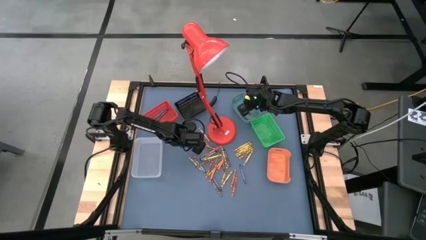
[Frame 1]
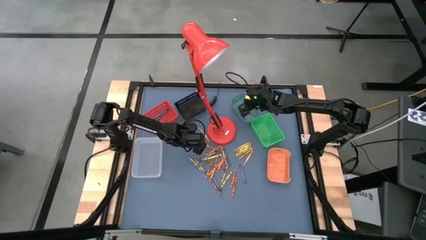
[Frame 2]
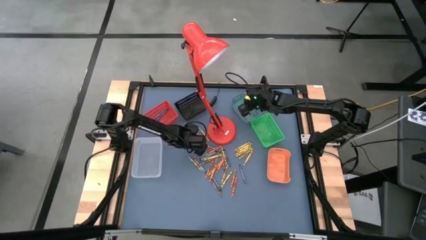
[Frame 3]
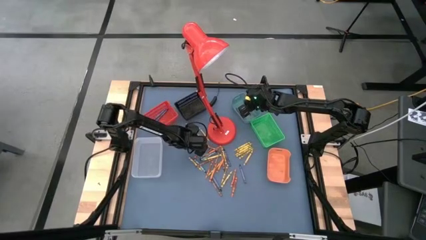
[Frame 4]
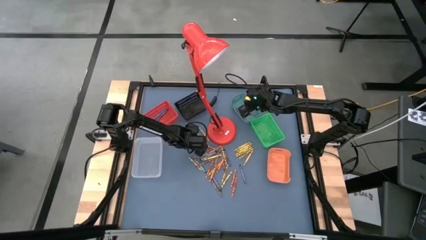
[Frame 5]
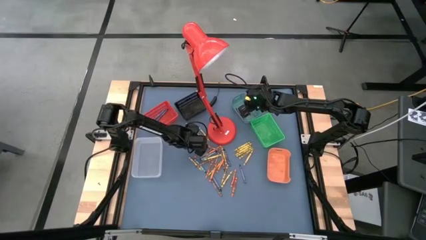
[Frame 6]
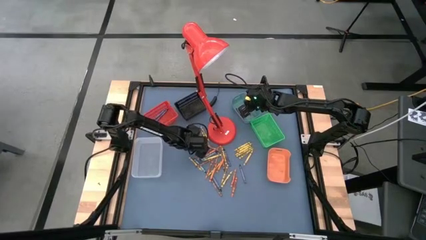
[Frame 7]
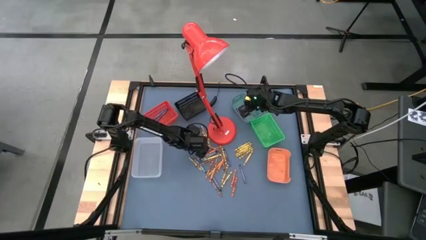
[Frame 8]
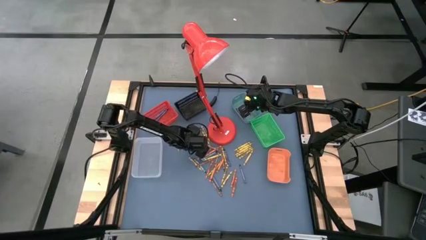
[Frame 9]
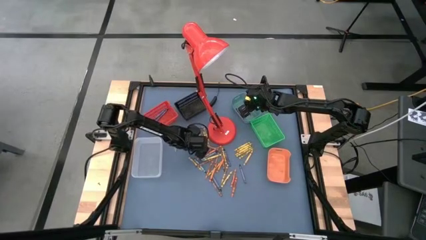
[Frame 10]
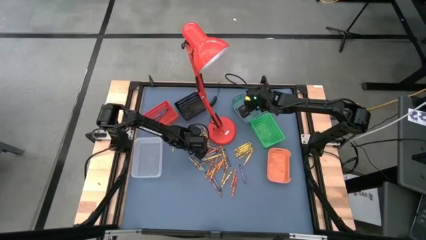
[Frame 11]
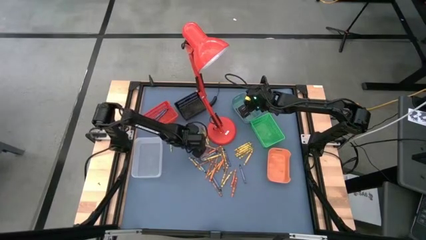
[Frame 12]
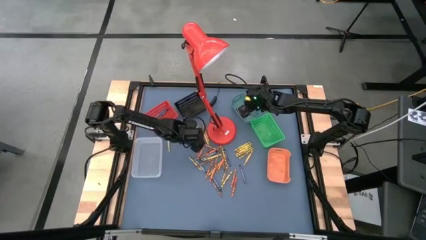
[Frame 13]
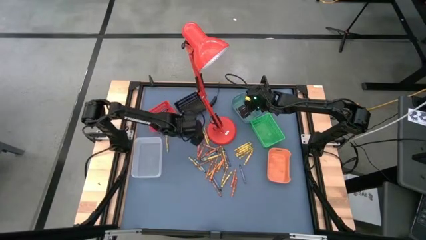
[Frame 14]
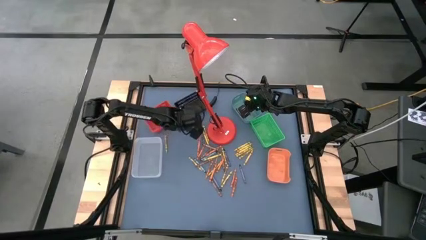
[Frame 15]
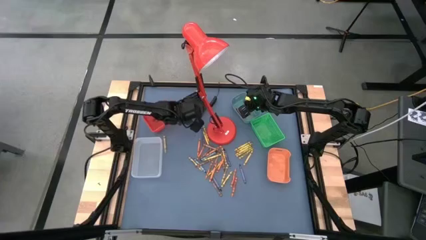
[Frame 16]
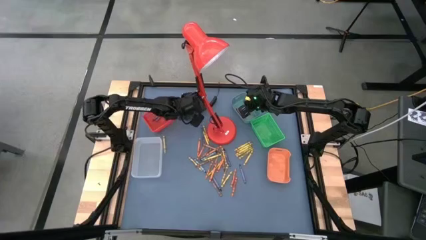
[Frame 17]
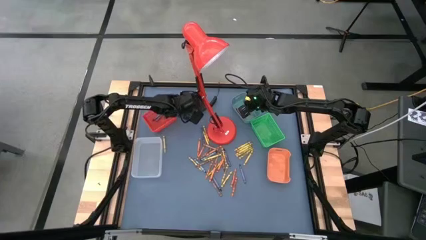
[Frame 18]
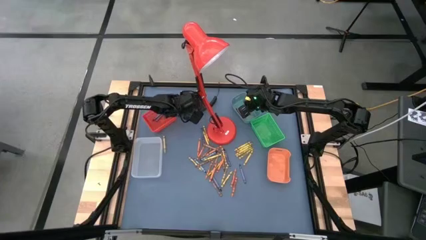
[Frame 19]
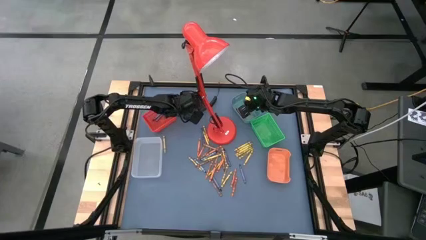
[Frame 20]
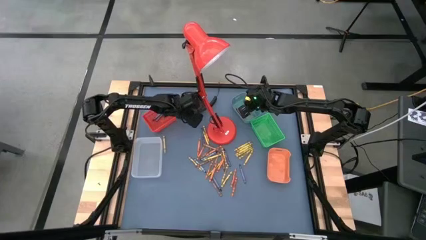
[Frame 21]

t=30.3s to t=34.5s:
Task: Sort crayons
Put the yellow crayon into the top left black bin

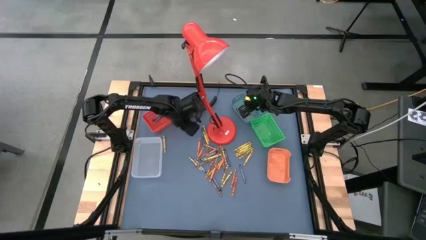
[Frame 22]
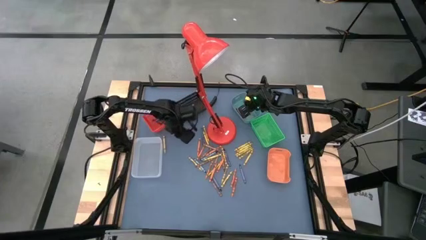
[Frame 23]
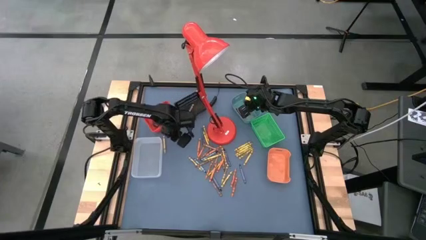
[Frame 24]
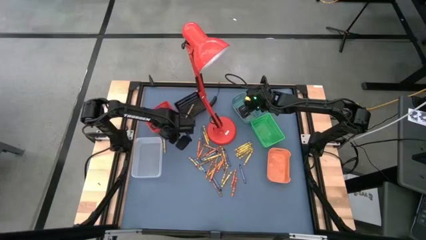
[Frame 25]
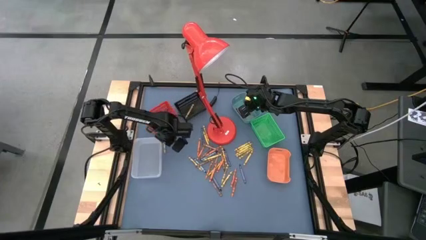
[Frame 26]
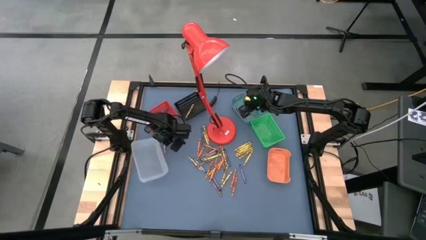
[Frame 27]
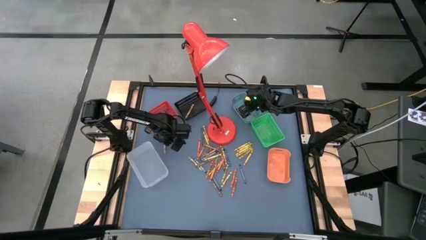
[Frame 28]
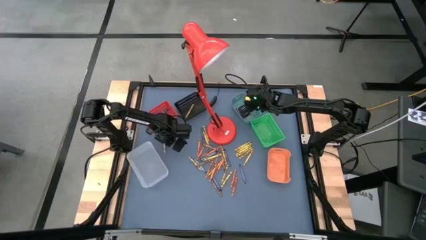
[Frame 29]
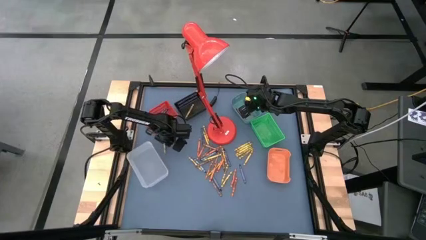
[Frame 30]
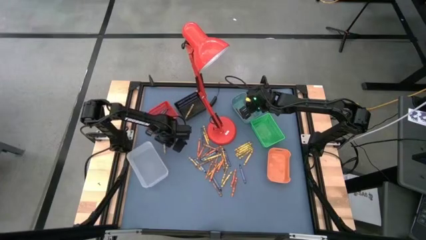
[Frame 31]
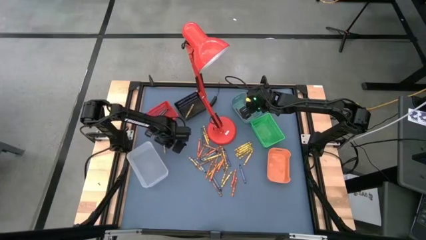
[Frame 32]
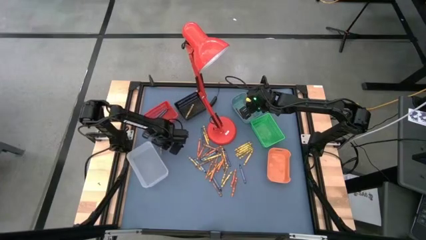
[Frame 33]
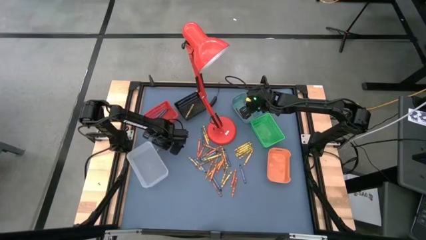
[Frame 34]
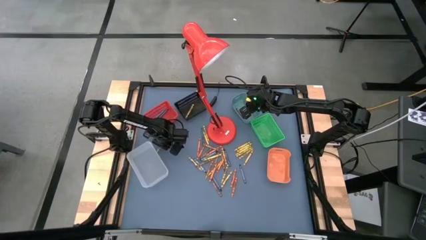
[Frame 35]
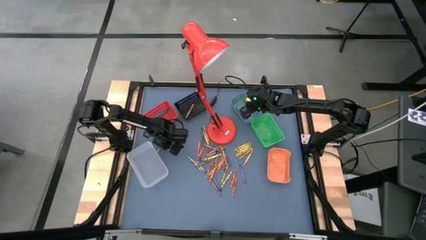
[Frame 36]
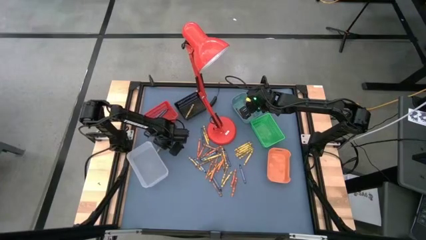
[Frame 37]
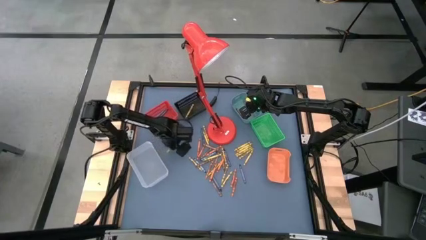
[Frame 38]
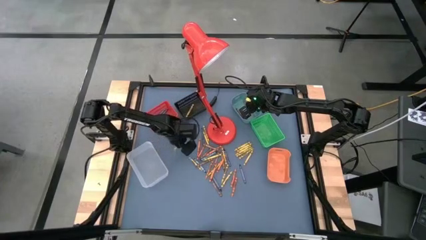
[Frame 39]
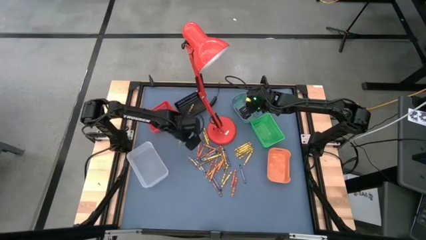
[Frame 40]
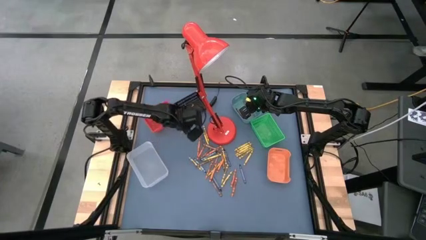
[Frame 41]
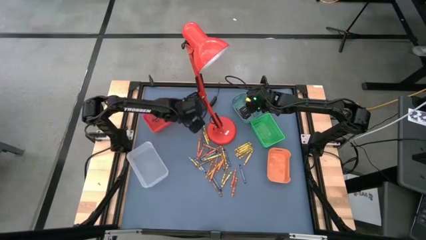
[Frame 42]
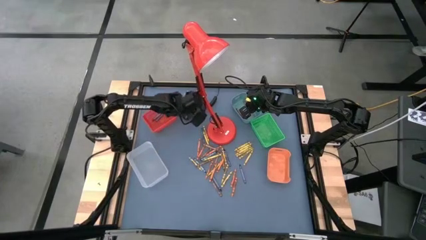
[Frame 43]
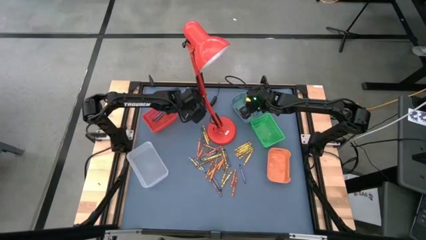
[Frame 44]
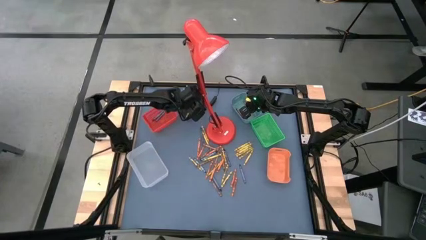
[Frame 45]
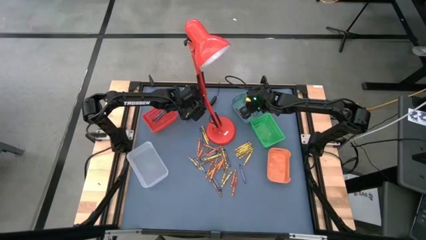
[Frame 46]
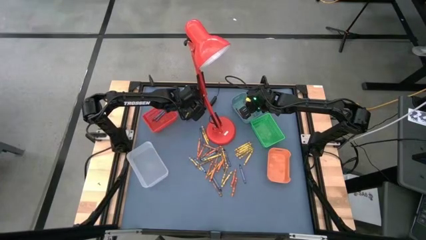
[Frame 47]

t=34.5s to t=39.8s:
Put the yellow crayon into the top left black bin

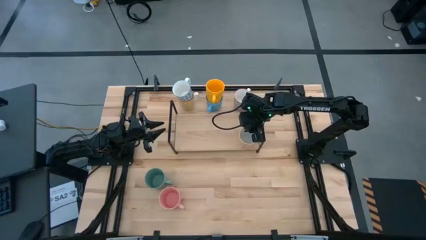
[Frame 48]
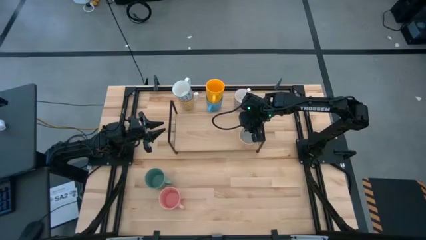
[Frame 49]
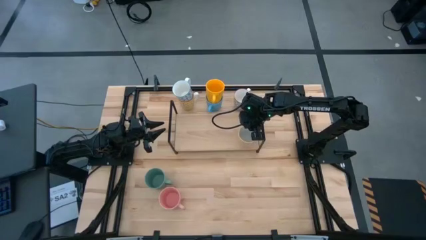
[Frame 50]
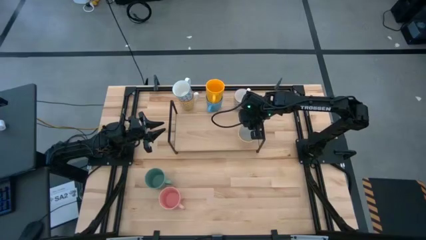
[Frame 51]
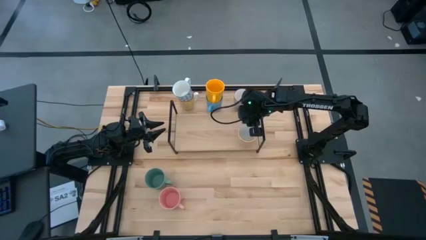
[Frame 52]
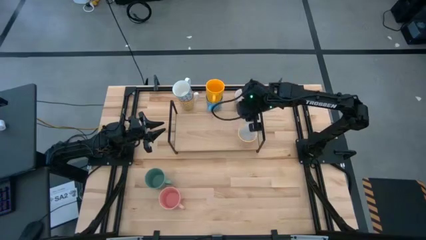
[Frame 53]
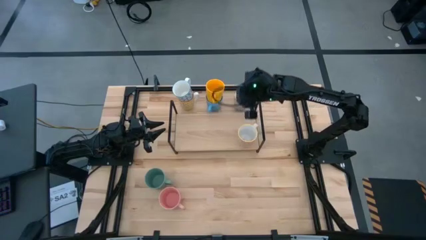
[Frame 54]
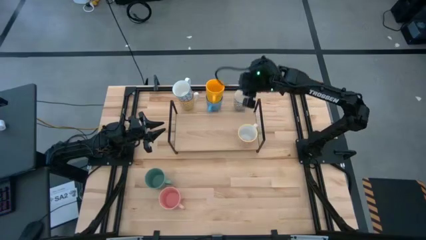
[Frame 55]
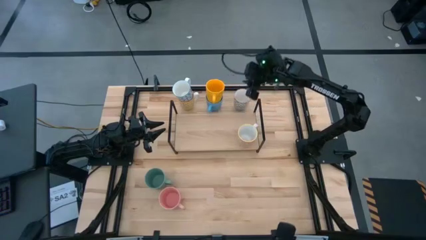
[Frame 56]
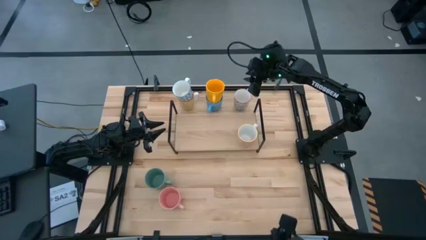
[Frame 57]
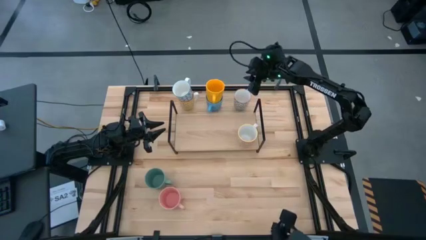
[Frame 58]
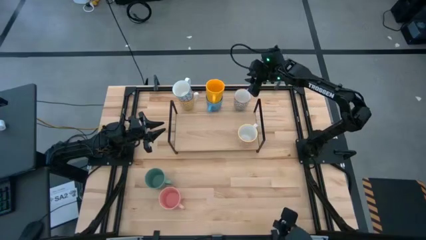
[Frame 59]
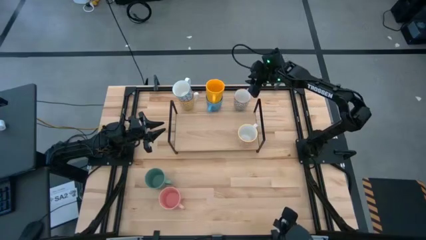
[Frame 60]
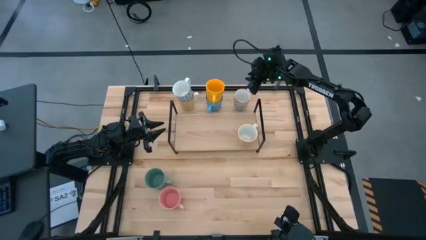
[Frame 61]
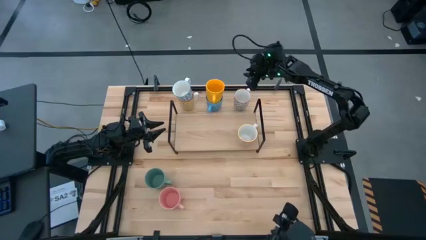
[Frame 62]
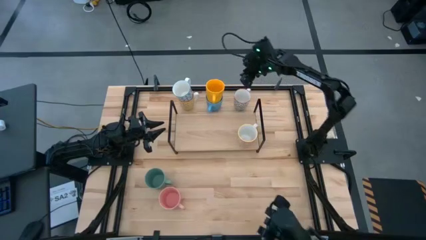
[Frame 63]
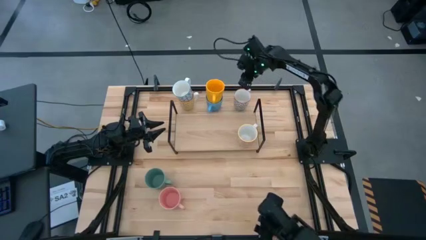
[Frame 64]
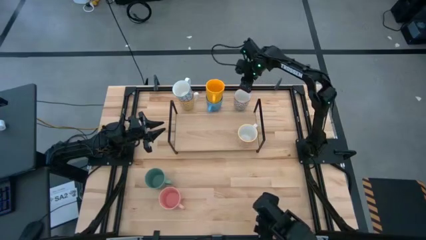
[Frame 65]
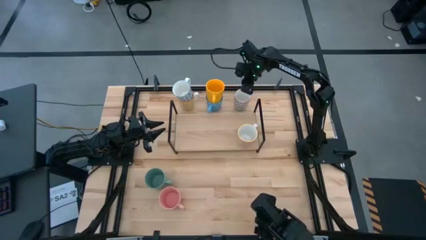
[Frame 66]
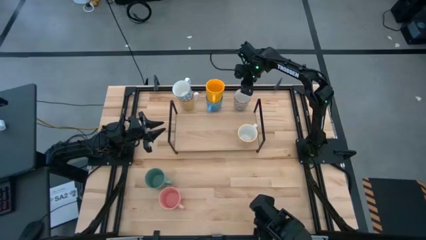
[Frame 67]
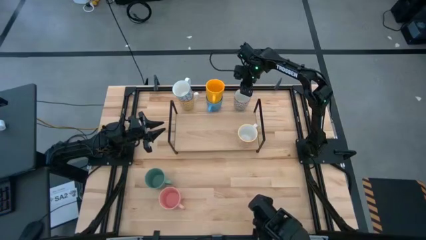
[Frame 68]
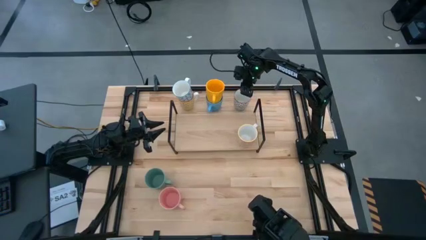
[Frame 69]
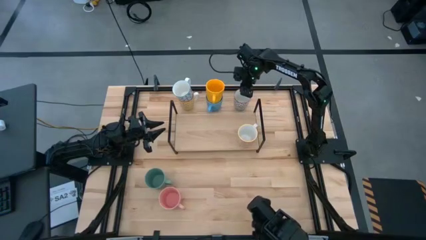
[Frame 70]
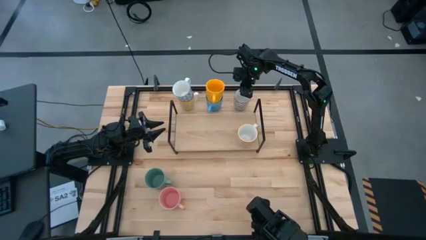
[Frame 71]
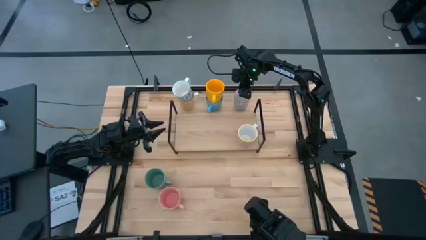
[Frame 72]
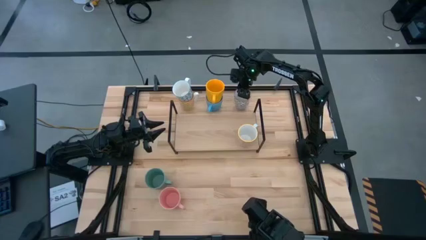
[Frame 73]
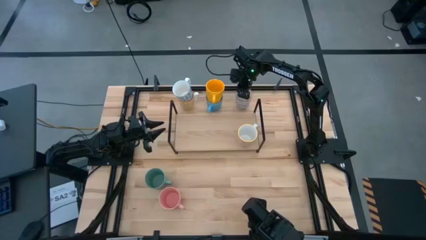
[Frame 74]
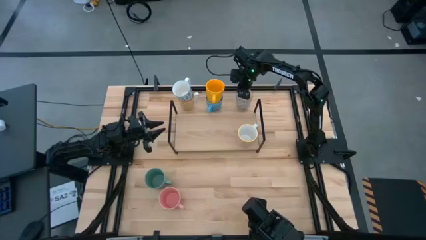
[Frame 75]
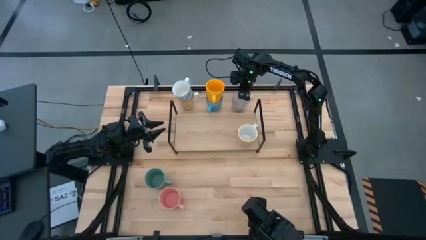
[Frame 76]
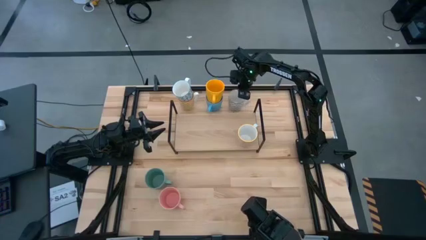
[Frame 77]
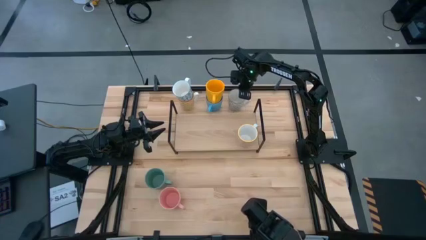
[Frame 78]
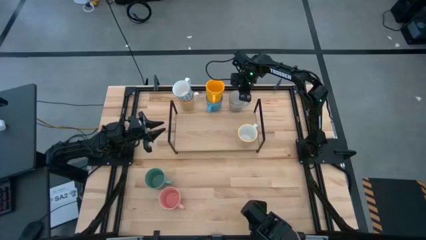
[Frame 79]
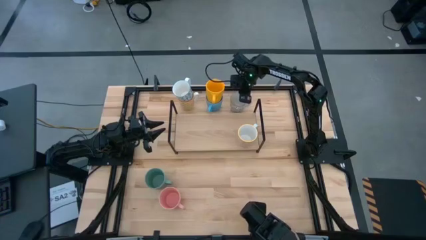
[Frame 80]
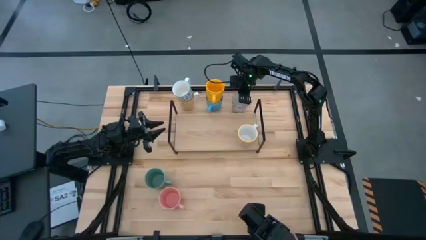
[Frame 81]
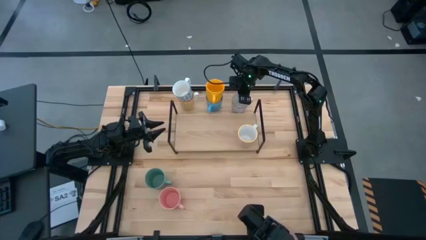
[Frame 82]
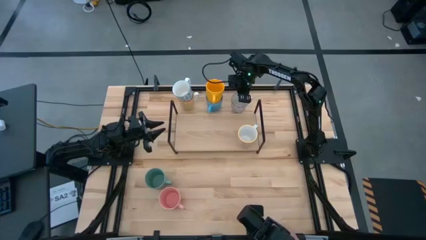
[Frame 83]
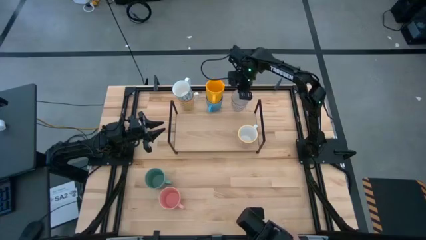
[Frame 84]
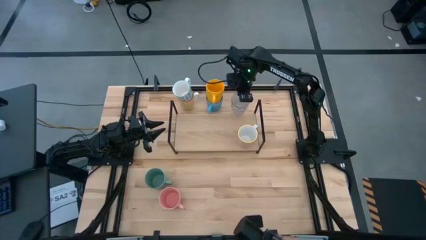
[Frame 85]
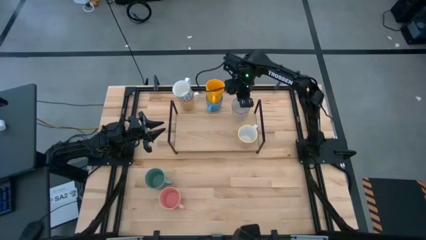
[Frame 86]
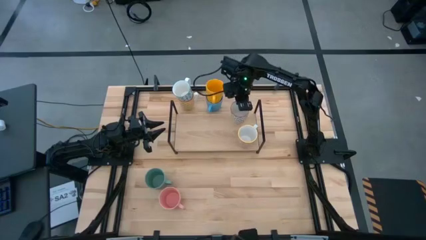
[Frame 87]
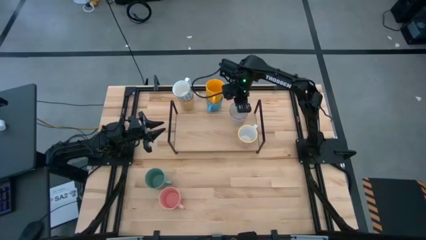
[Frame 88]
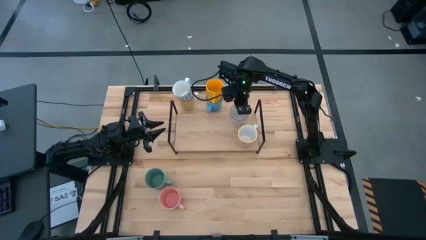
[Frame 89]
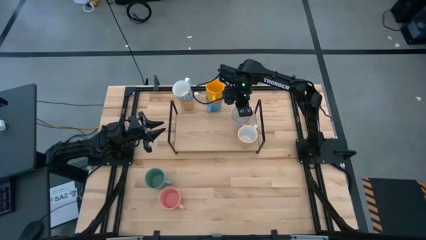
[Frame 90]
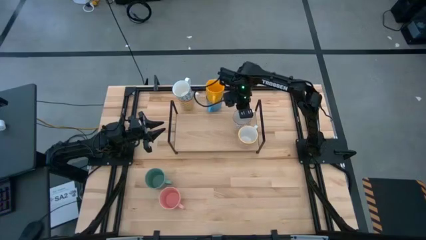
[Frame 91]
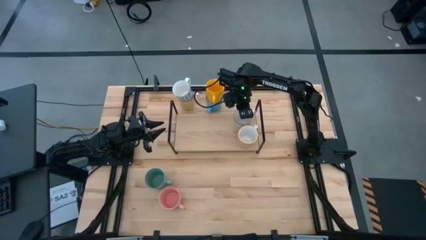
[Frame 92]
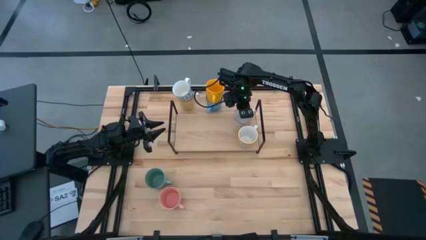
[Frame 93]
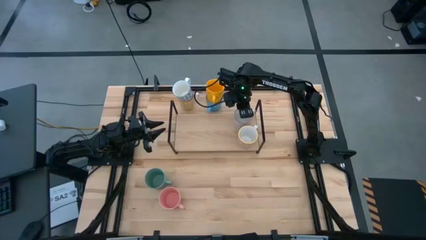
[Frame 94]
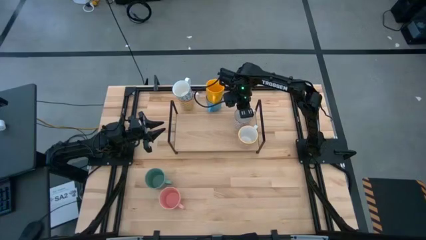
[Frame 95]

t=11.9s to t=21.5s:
Task: Place coffee mugs
Put the gray patterned mug on the shelf
